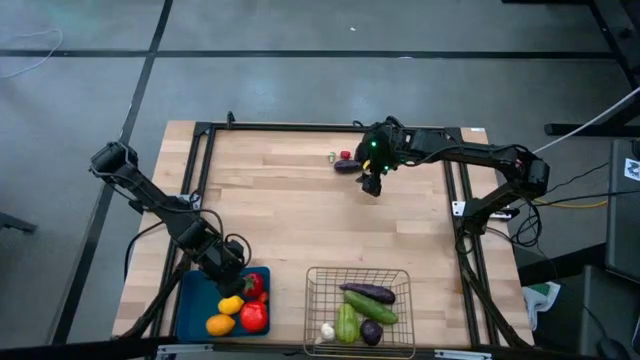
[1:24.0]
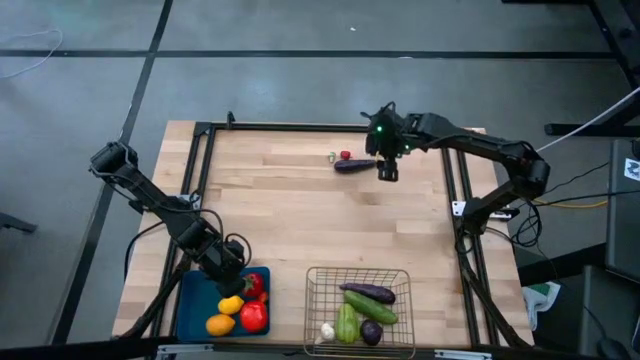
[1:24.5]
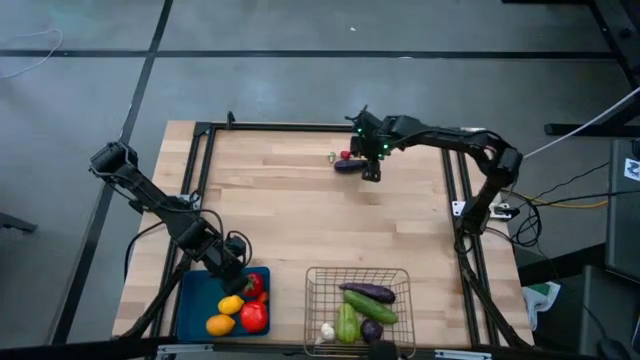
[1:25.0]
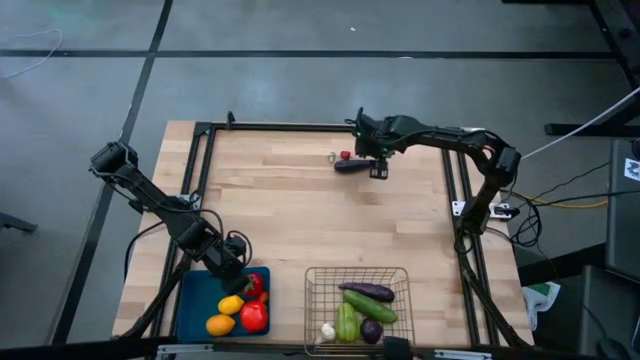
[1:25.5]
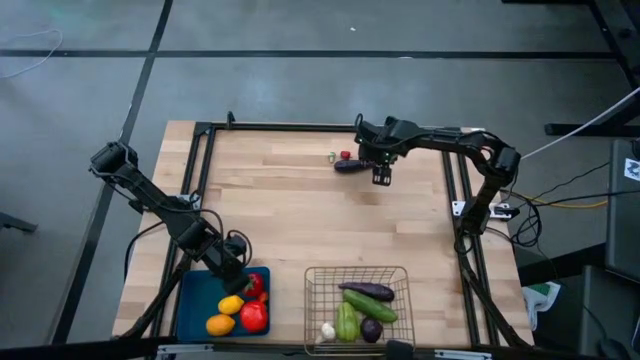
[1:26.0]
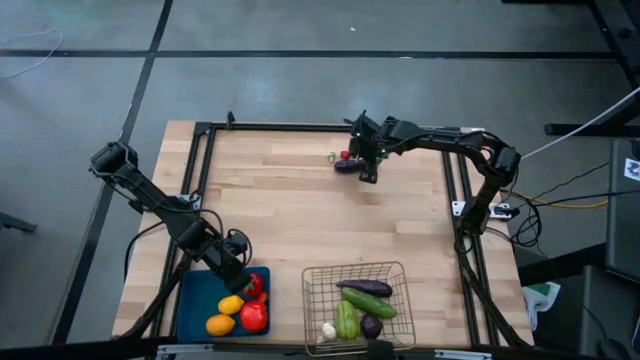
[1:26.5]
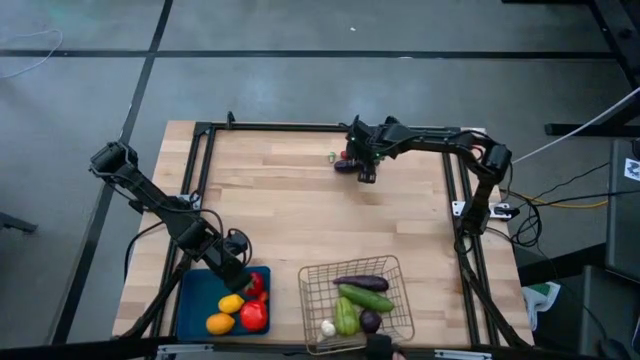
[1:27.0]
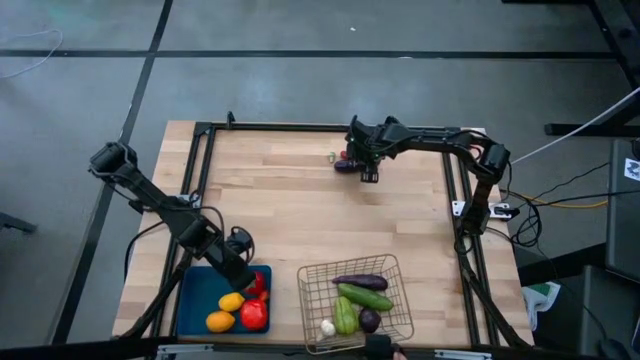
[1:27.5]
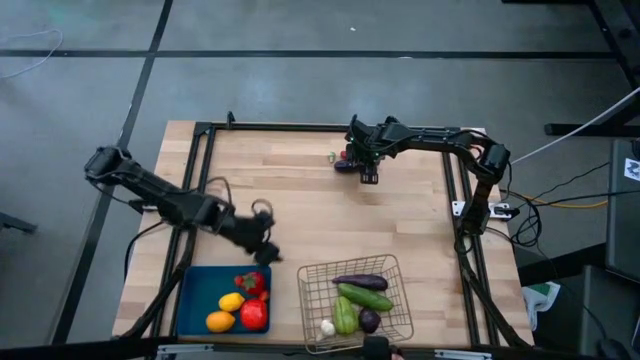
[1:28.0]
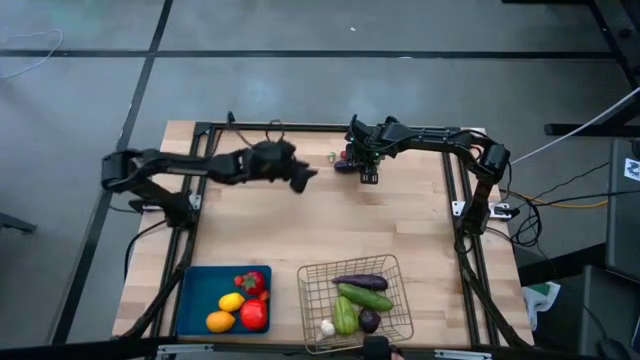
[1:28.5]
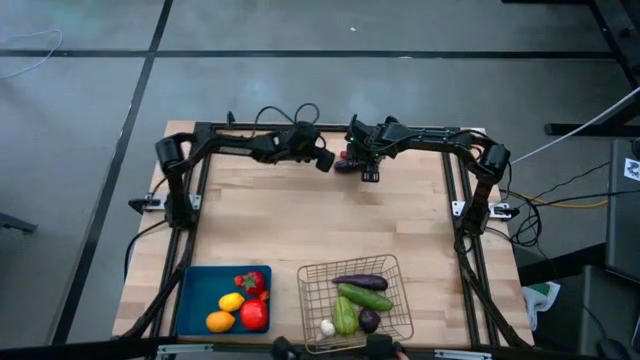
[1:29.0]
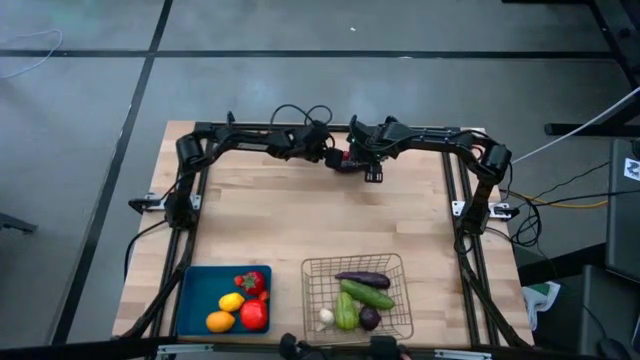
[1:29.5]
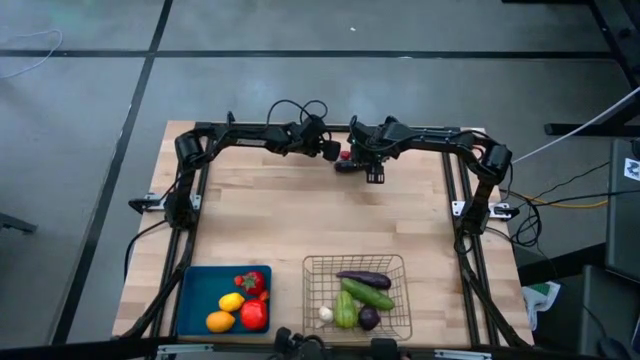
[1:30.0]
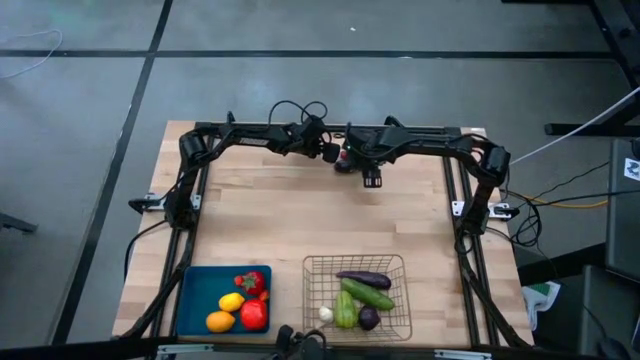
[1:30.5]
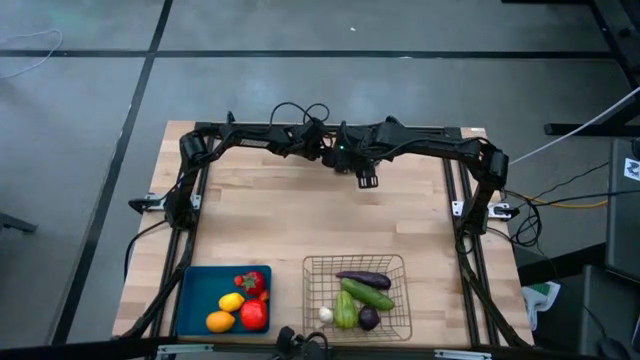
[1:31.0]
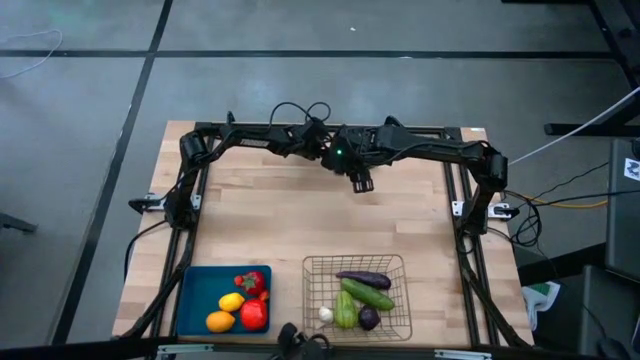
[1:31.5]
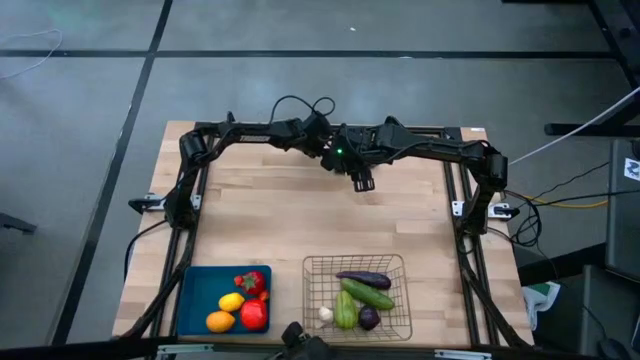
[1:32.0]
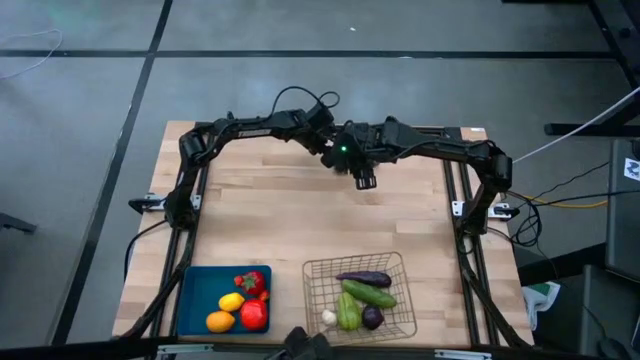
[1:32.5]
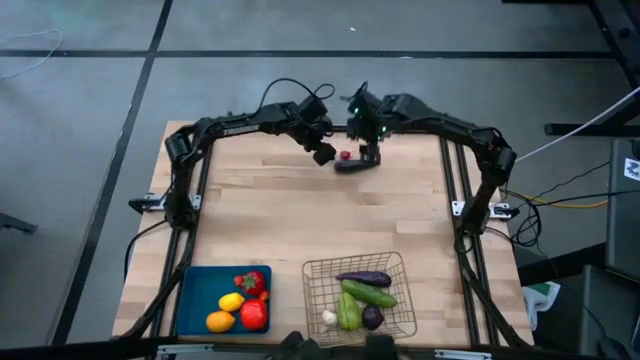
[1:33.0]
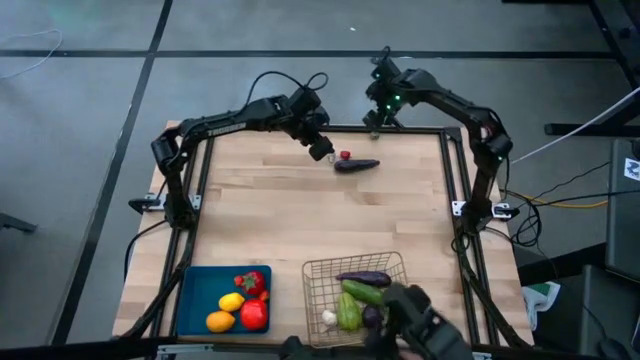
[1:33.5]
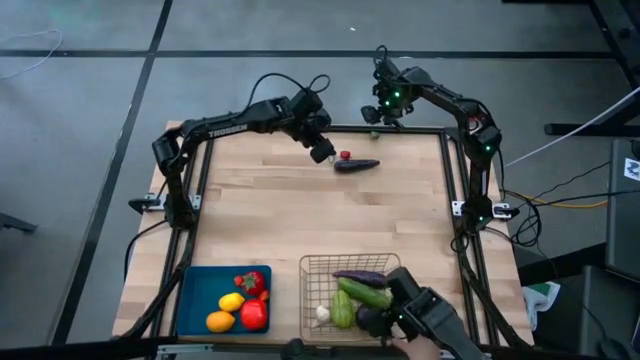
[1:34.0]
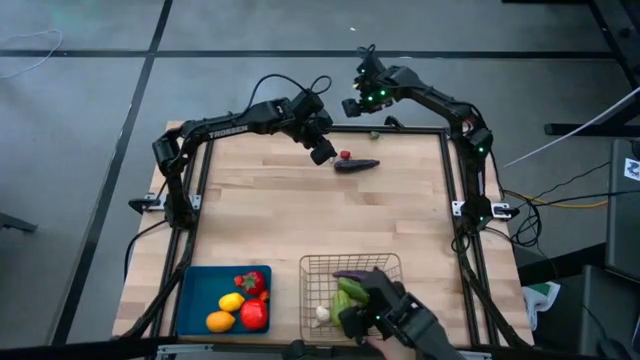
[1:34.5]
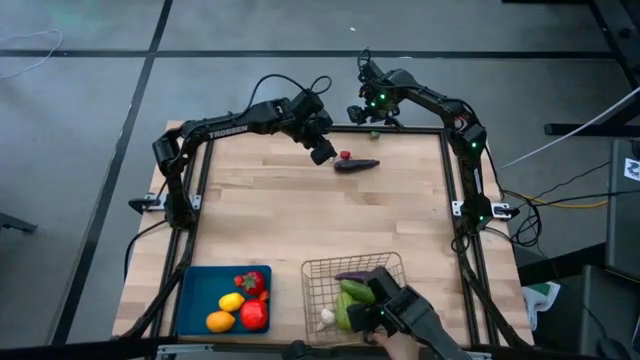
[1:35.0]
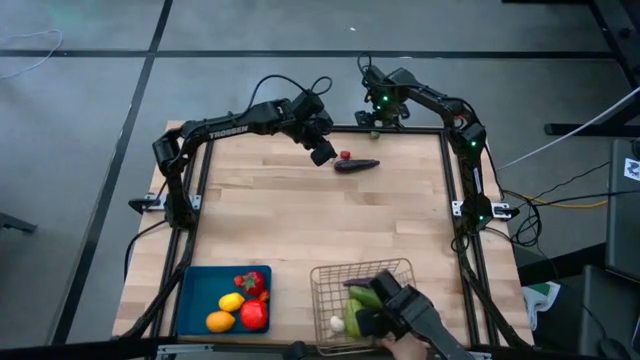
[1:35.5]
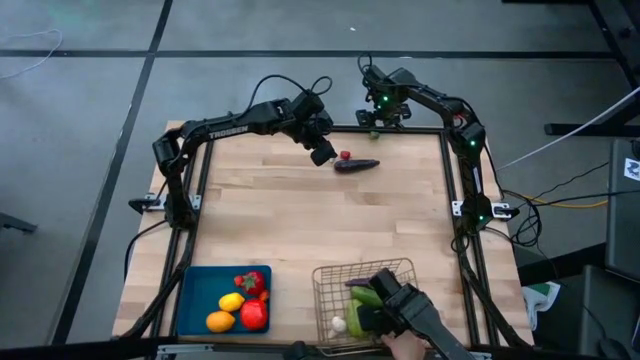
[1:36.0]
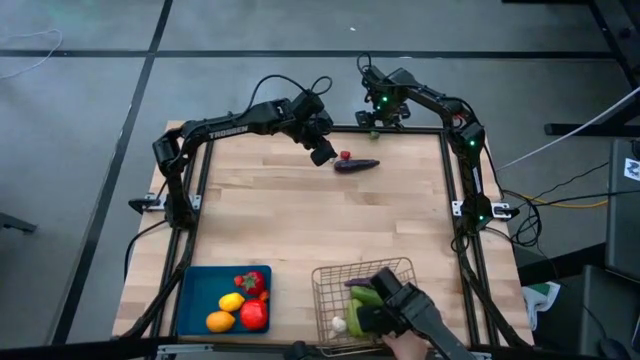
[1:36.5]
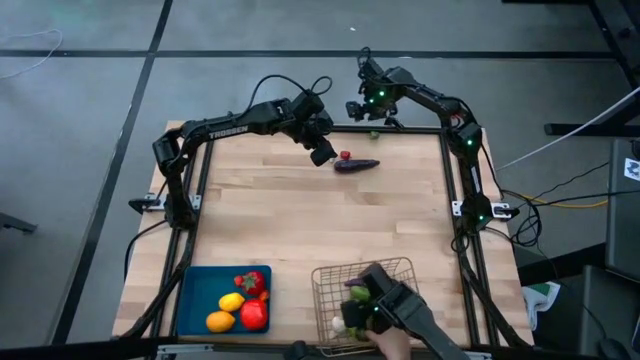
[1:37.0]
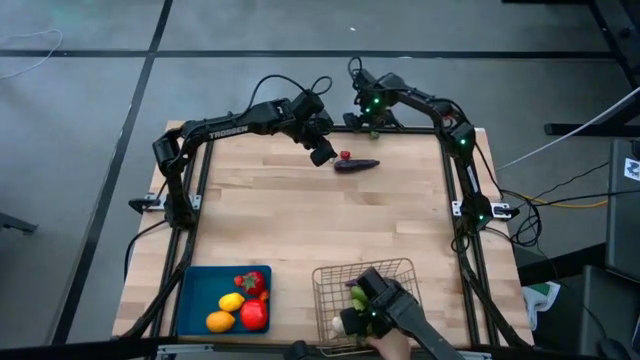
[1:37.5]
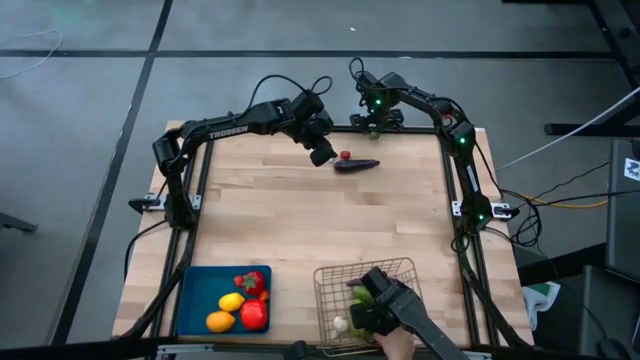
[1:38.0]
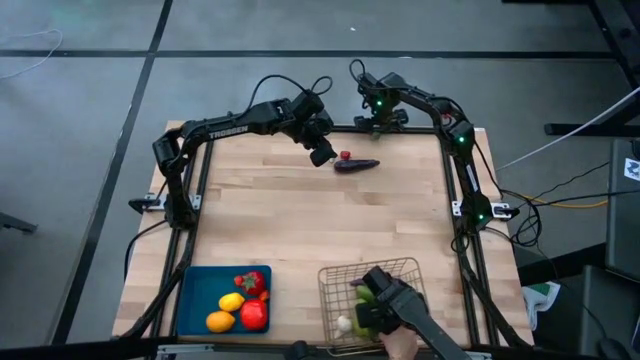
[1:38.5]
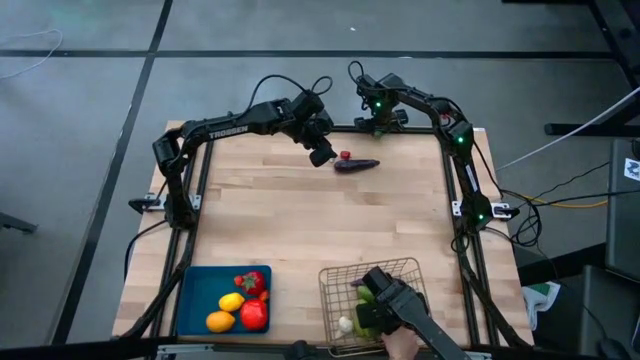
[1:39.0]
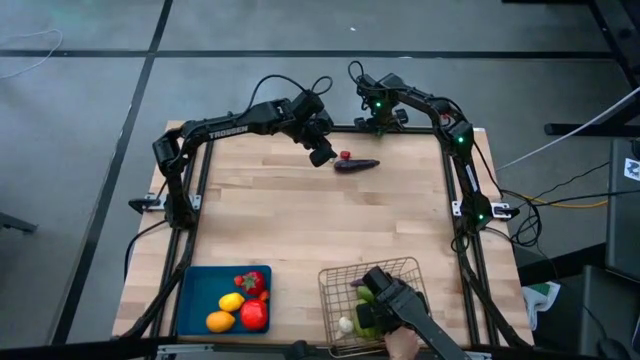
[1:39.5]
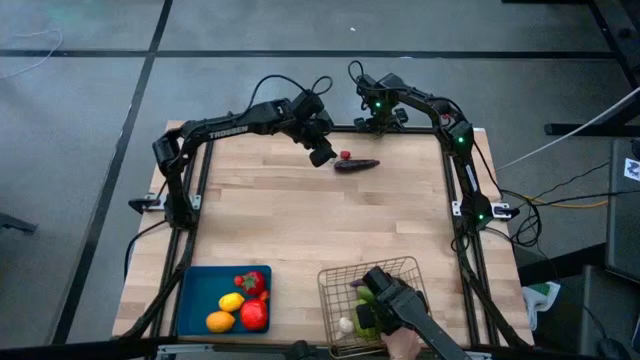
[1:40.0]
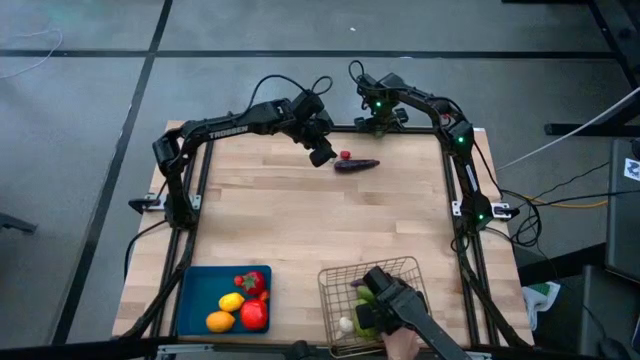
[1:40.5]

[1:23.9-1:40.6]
Task: Sort produce into baskets
Put the green bell pepper into the gold wire basket

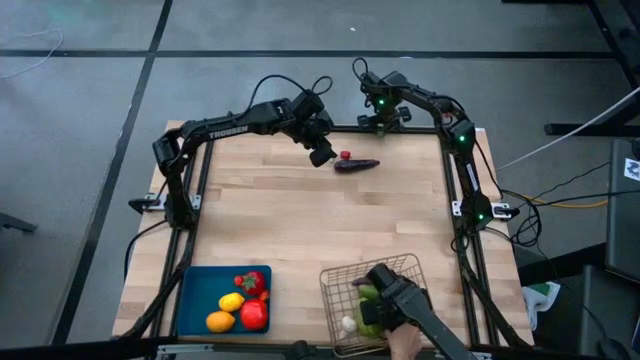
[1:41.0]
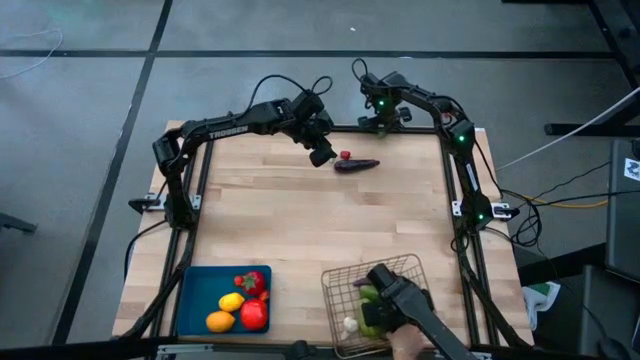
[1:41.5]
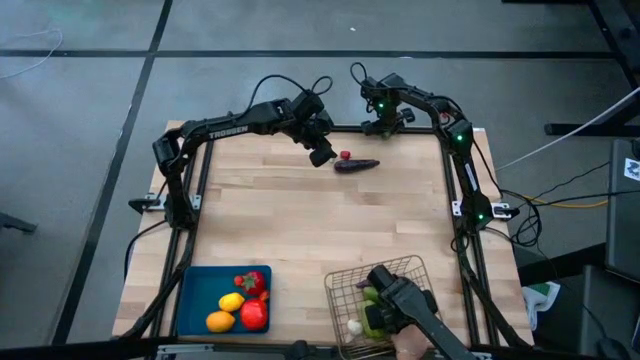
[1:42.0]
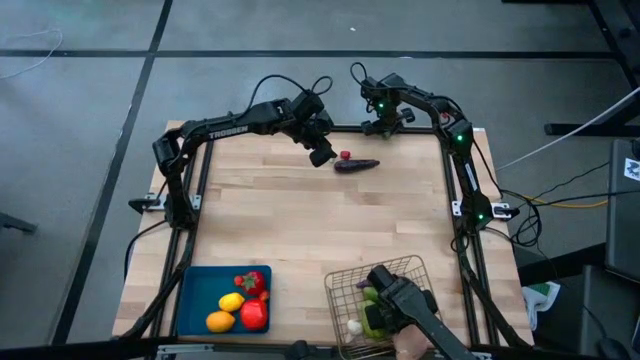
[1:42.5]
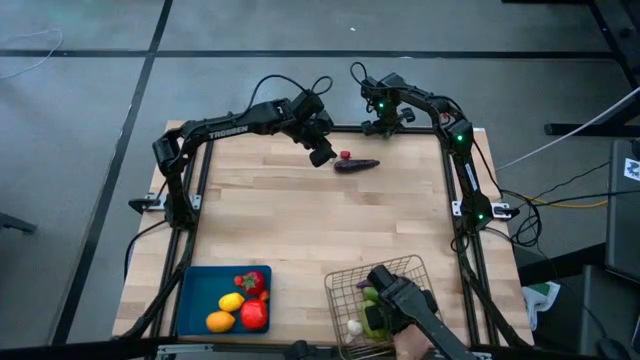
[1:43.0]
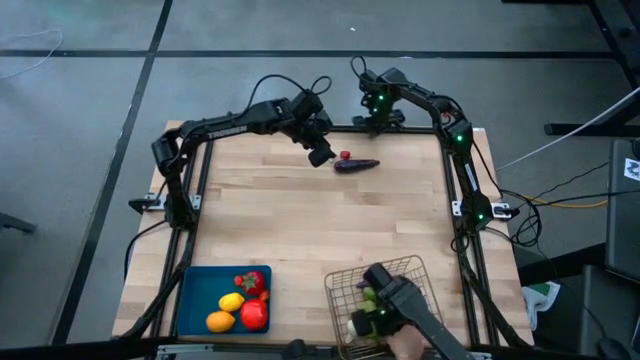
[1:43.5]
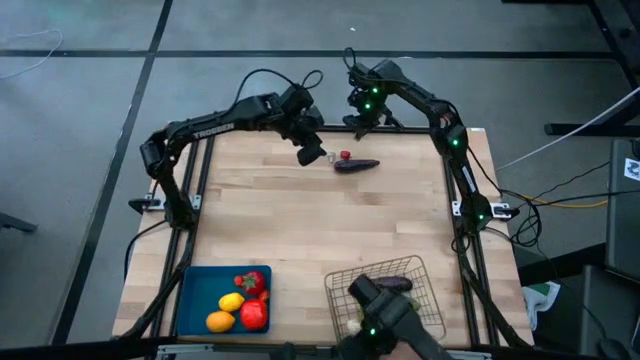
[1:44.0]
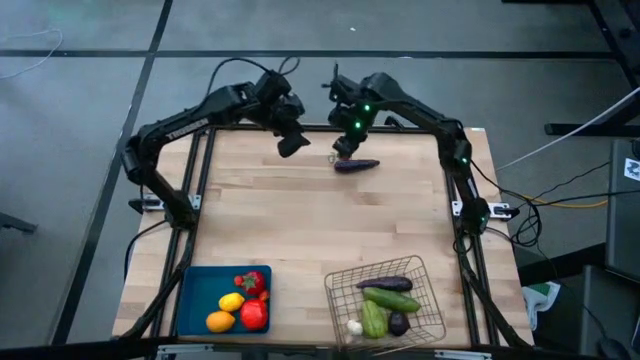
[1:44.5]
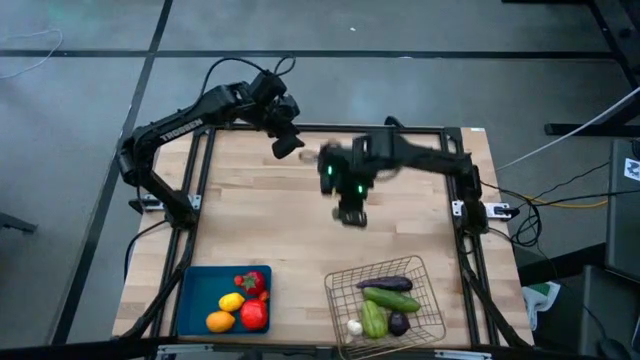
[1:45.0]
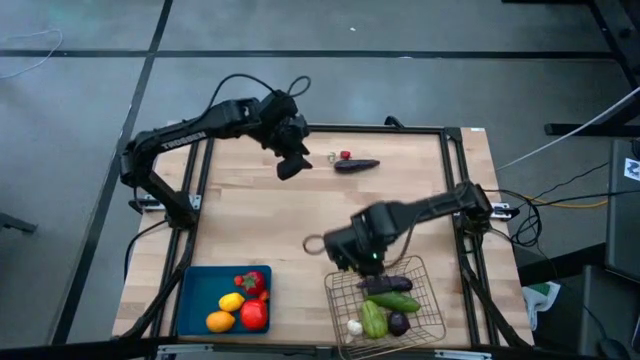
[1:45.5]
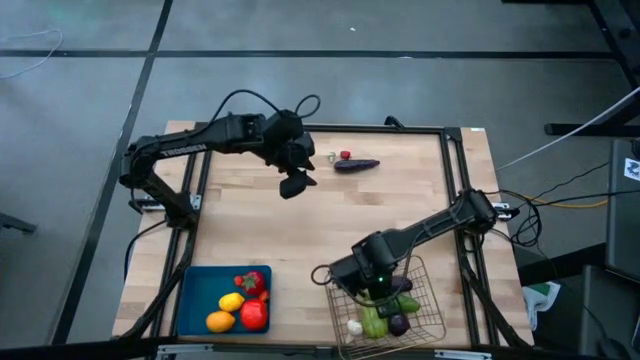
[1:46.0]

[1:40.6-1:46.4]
Put the green bell pepper into the gold wire basket
